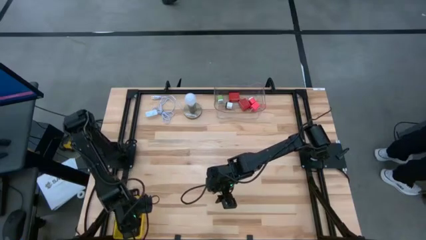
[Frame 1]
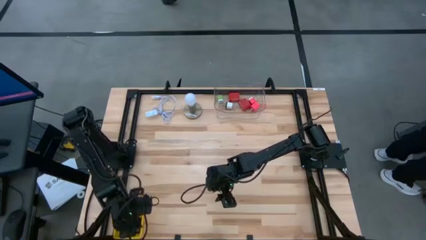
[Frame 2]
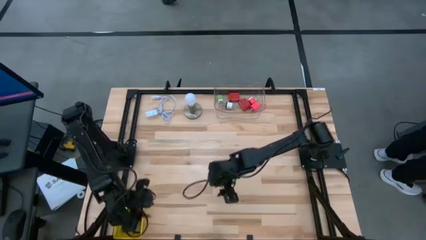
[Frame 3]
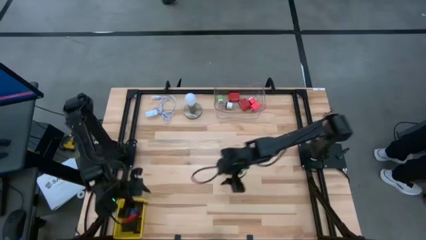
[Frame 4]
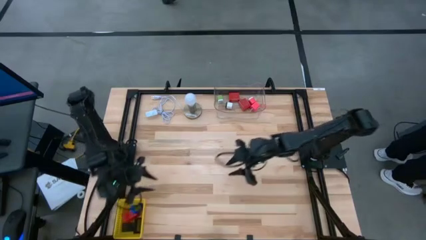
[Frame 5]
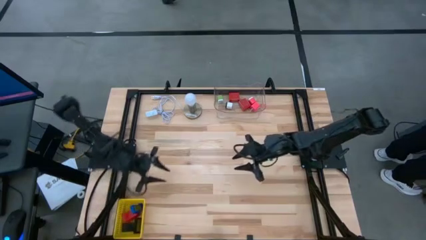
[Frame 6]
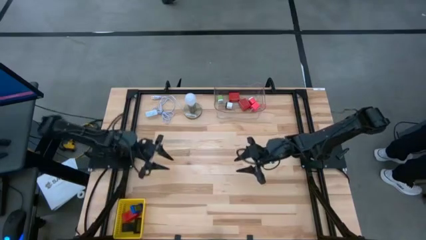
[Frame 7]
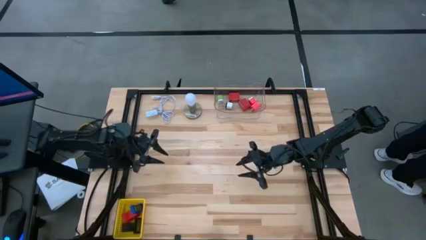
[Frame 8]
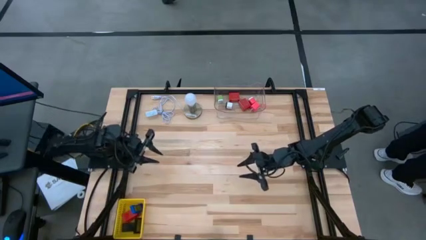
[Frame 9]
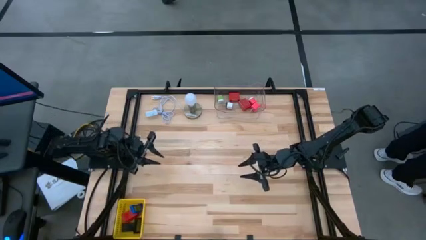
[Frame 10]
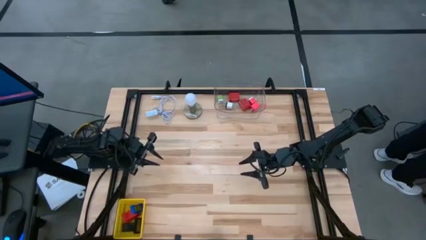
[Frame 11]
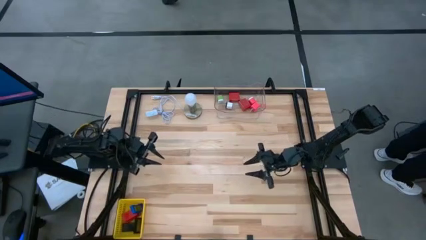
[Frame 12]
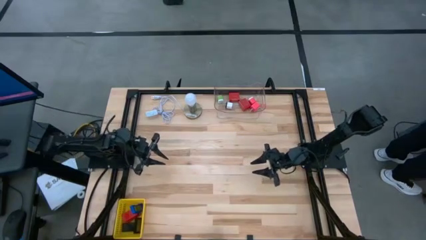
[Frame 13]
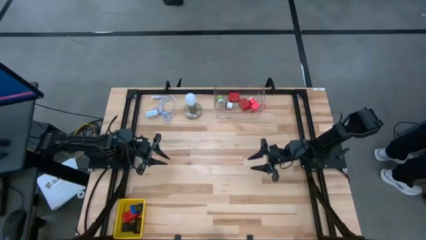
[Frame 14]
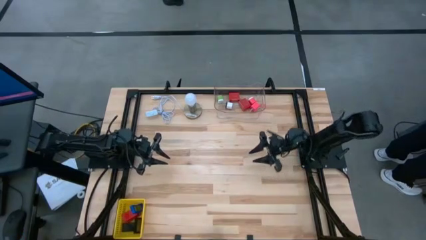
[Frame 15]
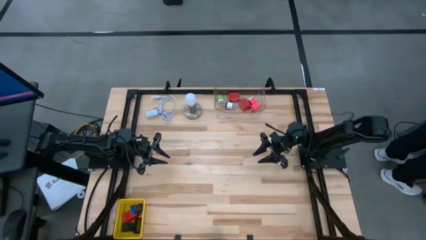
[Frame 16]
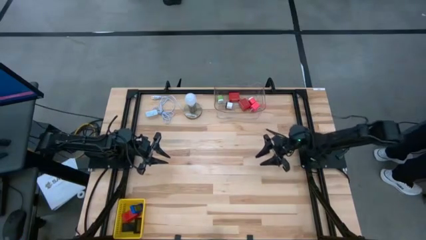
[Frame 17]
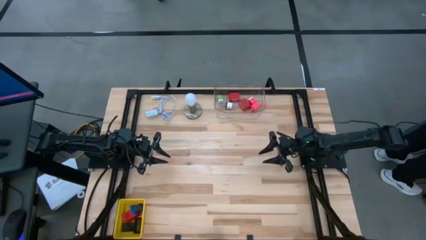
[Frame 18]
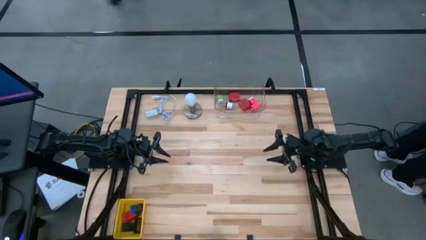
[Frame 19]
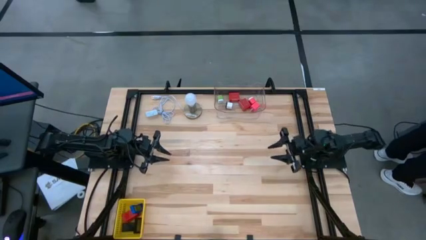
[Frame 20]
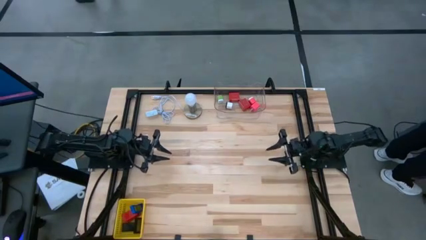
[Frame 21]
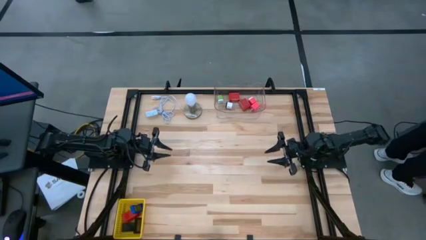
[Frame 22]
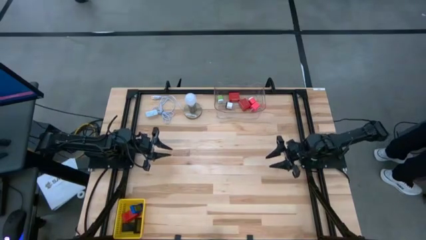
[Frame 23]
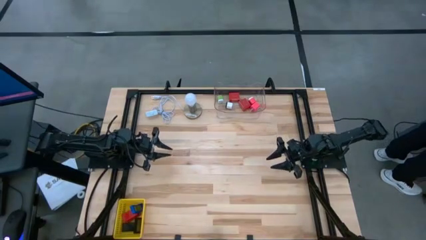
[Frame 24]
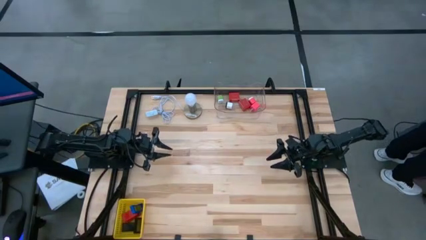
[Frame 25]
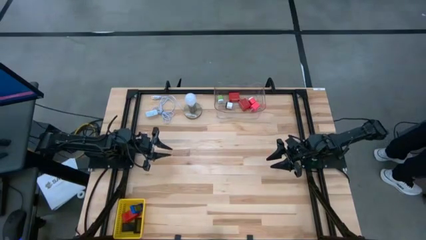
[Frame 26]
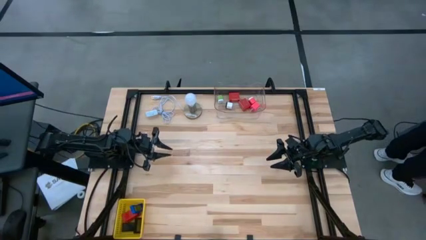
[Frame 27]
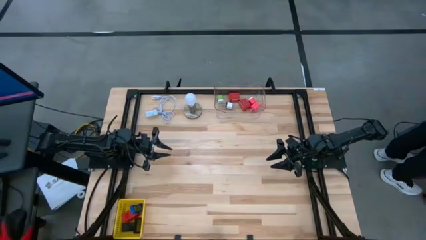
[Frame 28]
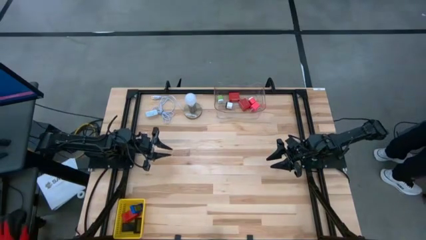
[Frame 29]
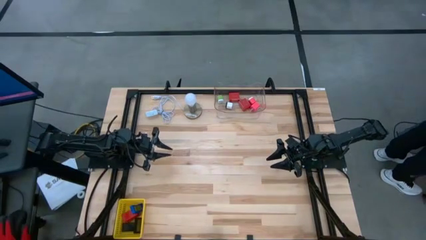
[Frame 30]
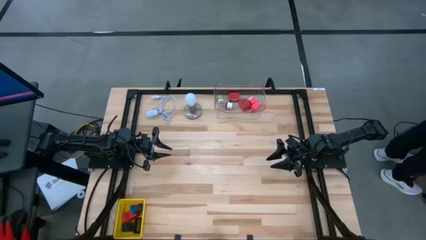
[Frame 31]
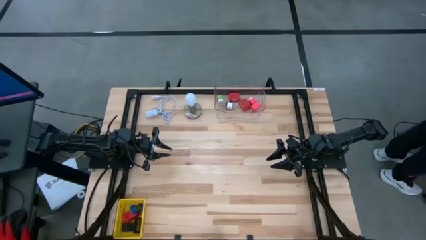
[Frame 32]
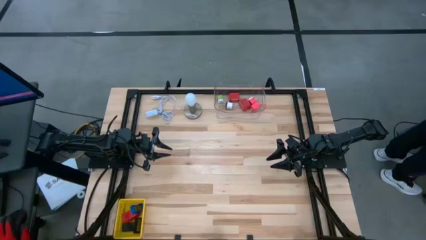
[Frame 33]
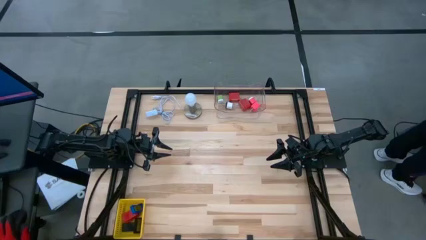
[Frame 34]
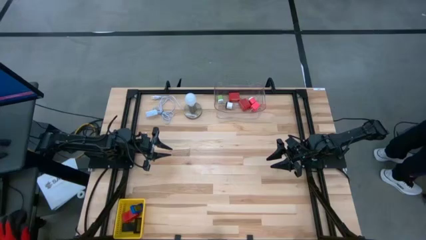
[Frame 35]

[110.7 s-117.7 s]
Task: Pick & Place Office items
Return to Home Position

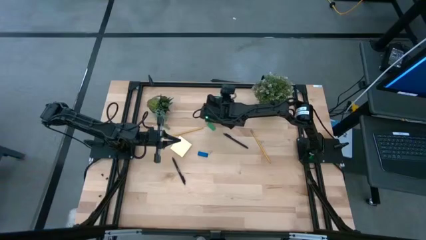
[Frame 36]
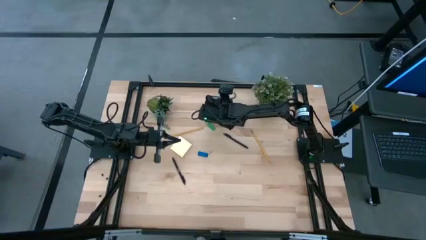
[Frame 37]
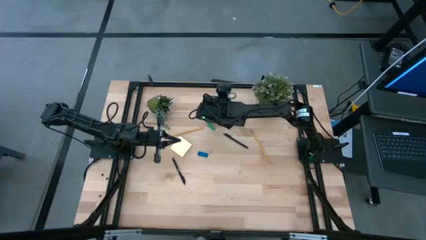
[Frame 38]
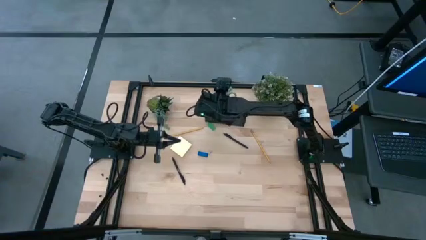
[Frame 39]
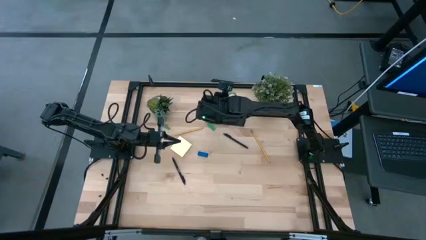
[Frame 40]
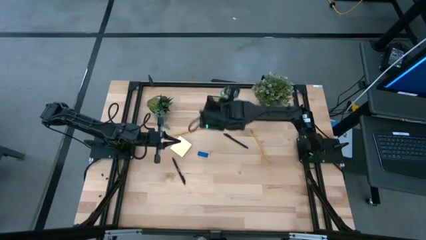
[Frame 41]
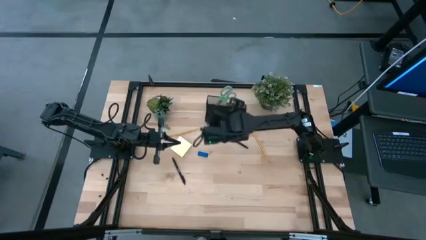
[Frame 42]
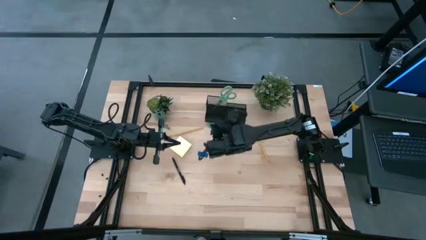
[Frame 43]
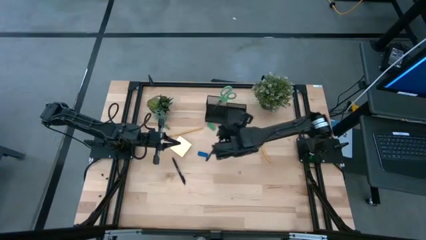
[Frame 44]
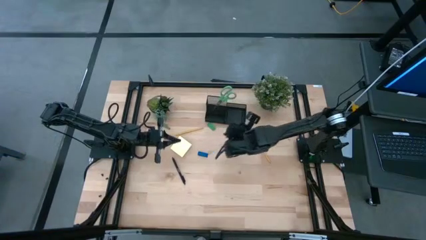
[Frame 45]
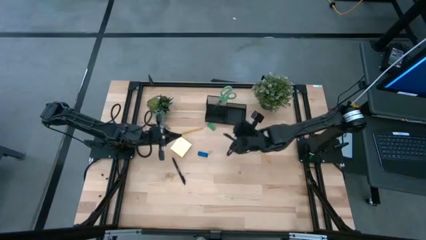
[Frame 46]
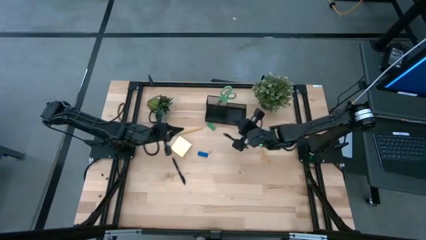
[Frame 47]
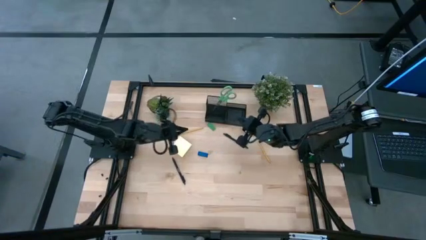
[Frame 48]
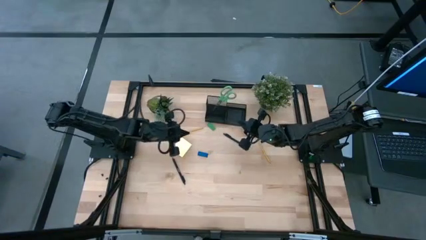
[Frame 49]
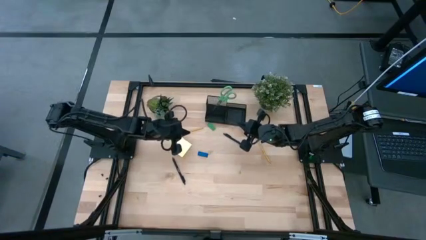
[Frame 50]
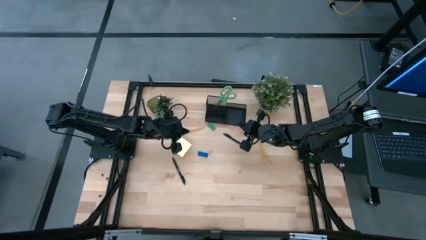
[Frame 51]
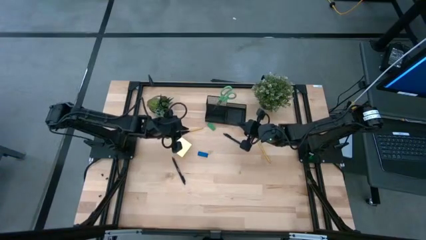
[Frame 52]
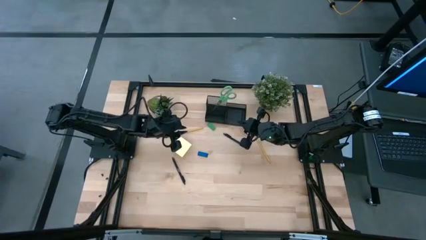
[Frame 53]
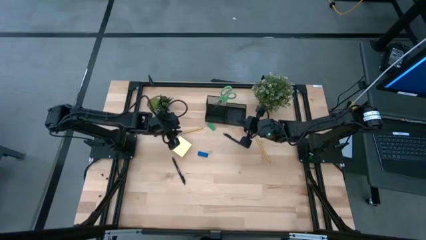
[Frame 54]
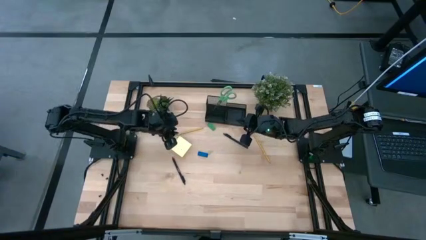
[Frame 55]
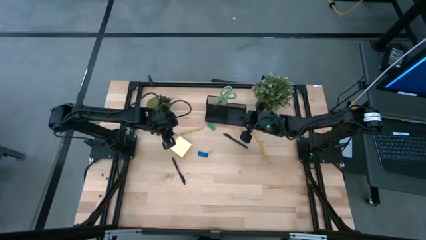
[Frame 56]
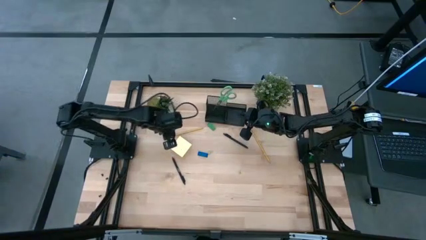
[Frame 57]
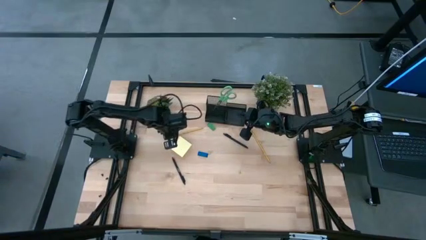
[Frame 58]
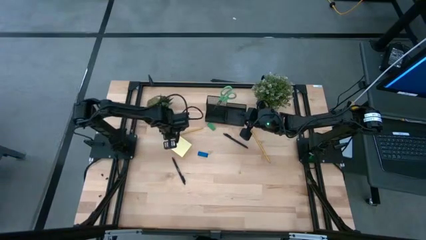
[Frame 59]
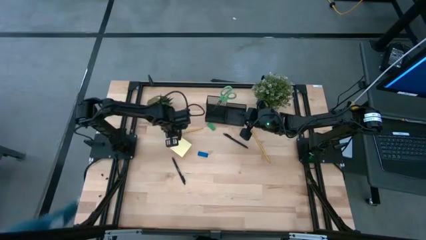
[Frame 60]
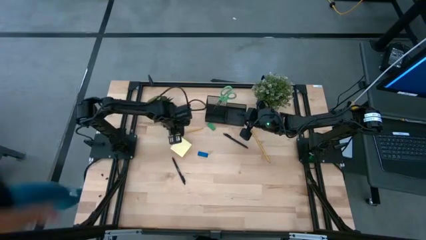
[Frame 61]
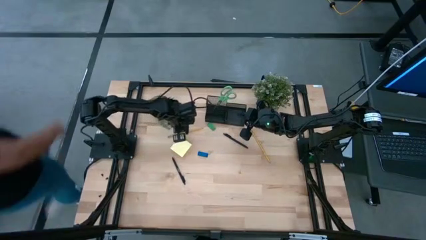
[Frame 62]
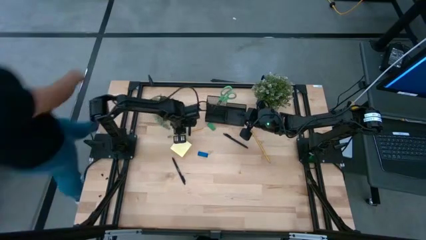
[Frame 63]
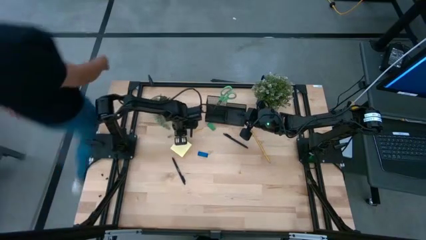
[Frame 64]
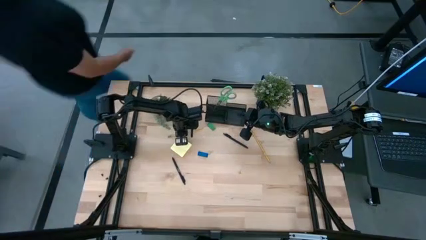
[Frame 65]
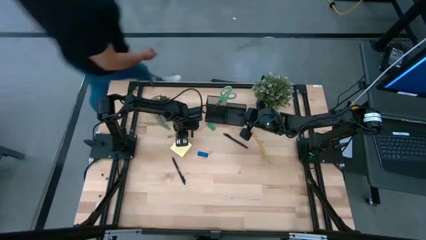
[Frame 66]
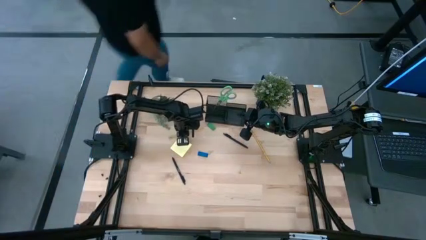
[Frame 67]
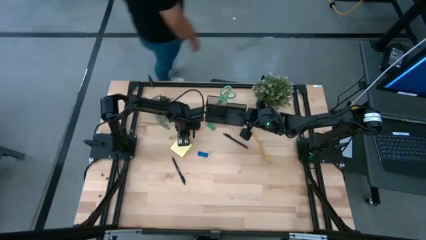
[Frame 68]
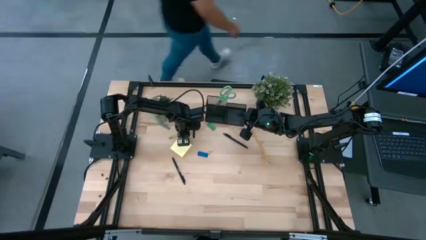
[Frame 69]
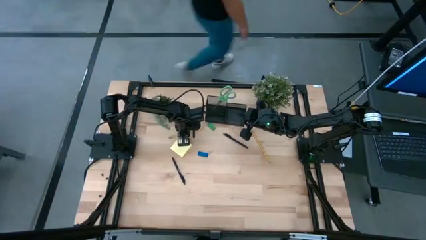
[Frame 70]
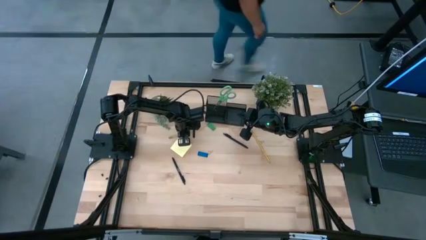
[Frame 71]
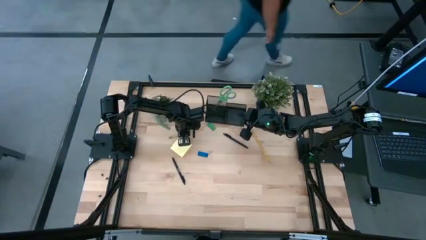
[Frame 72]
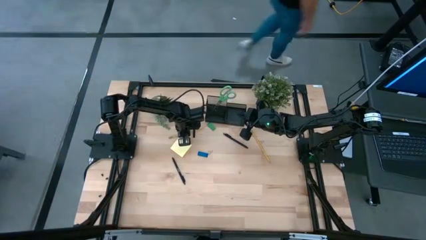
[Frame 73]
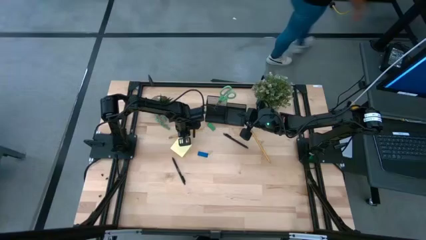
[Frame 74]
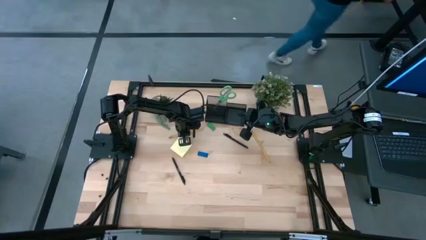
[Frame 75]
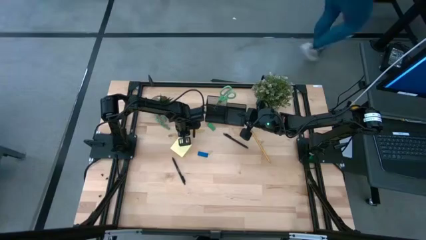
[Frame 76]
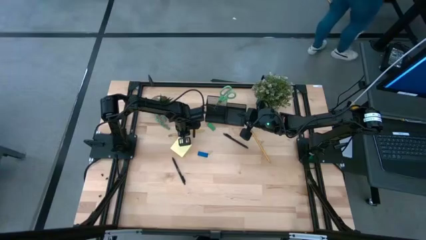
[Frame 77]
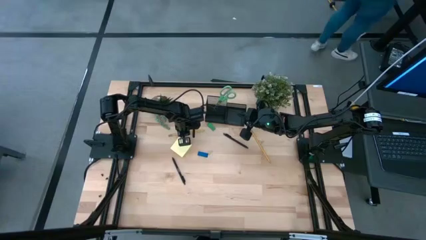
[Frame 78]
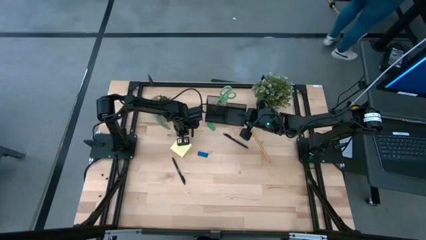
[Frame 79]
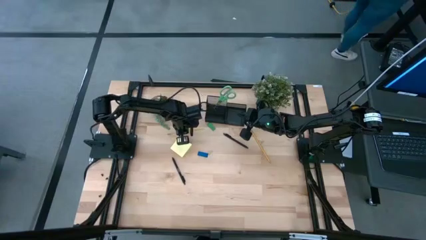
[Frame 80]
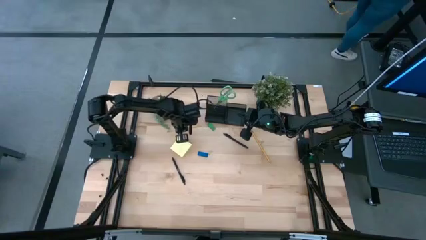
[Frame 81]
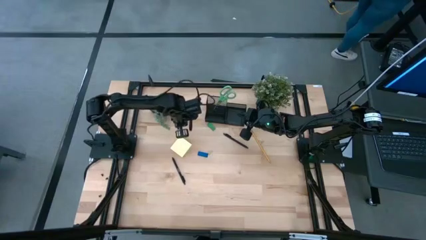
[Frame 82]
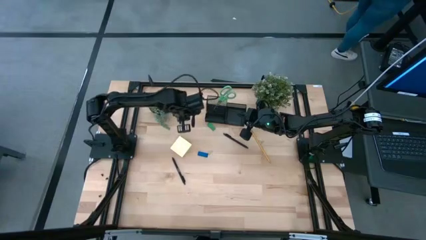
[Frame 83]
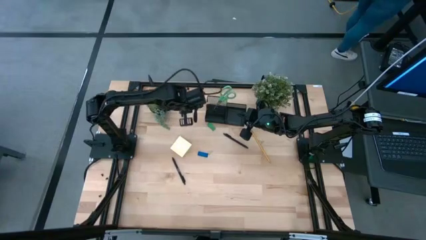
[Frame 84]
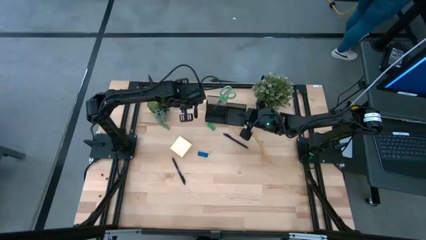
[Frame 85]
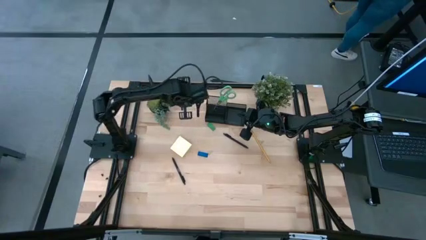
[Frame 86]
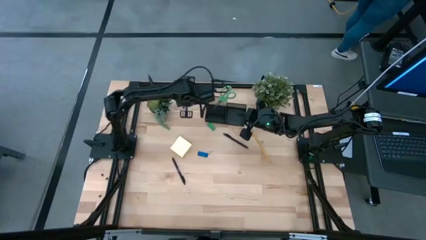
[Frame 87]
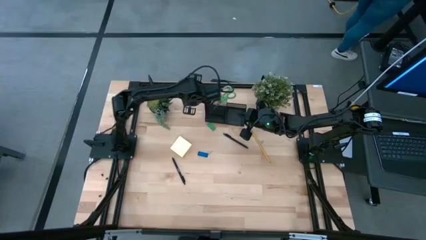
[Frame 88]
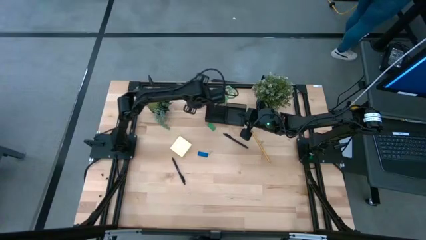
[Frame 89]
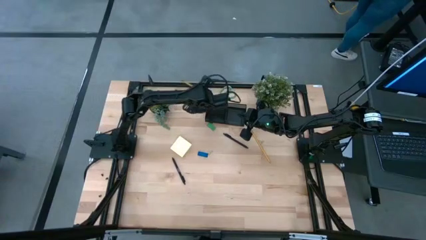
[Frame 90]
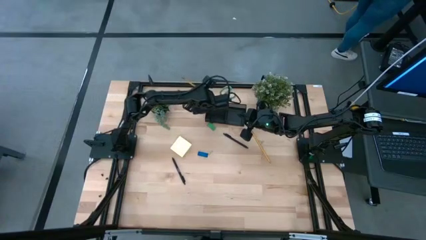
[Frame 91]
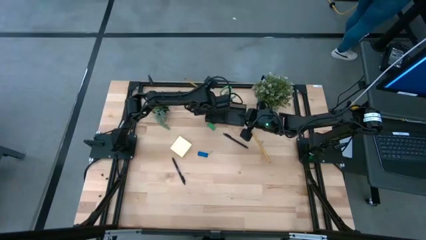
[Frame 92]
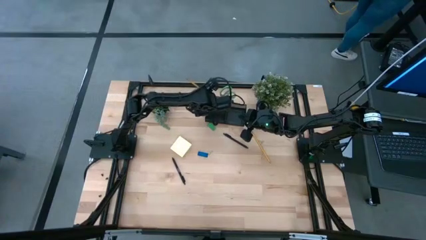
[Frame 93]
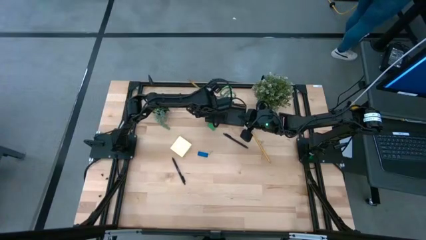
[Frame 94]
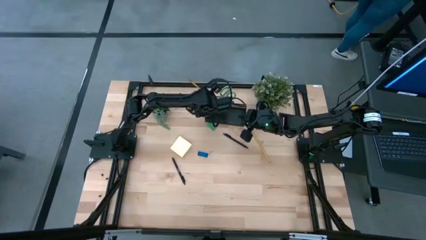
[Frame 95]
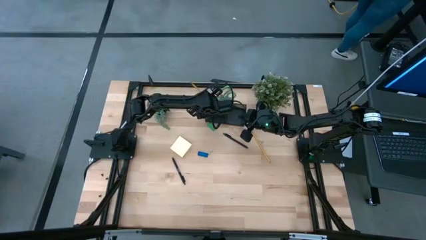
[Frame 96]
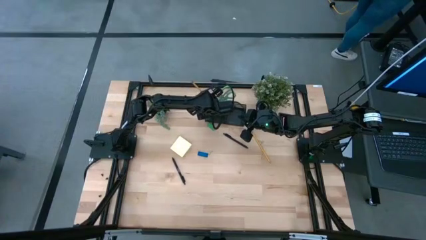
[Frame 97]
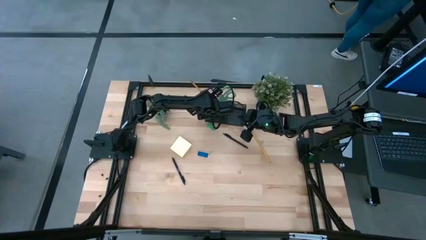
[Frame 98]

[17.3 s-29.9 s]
Task: Pick and place office supplies into organizer
Put the left yellow pencil into the black desk organizer
